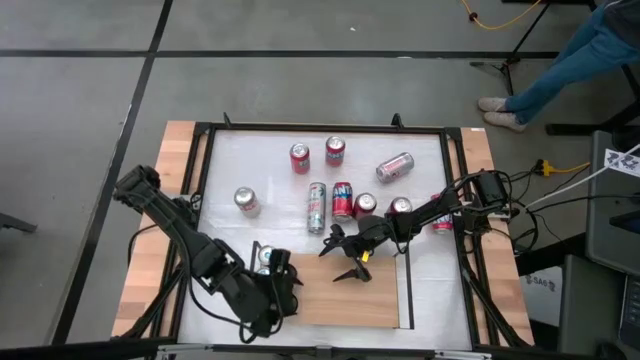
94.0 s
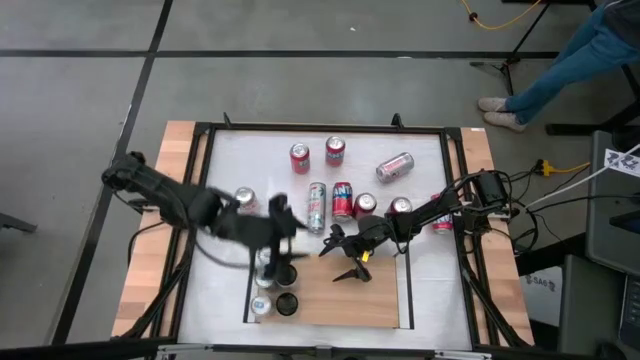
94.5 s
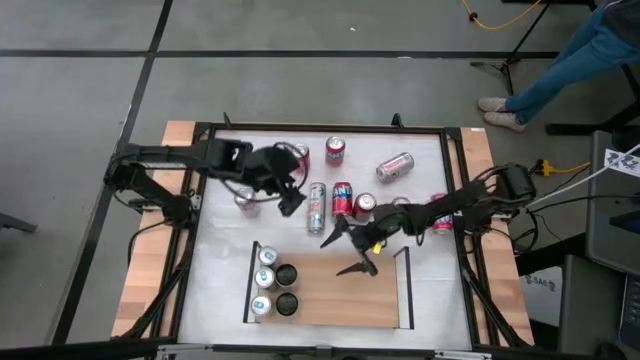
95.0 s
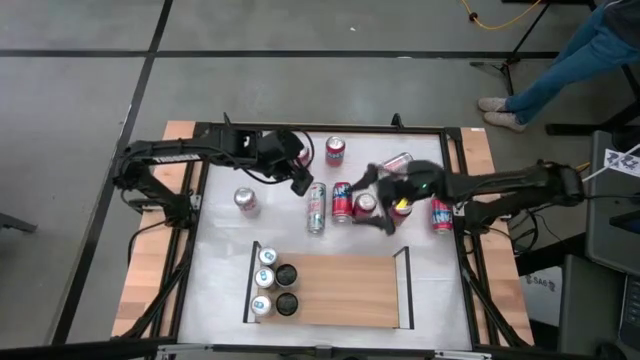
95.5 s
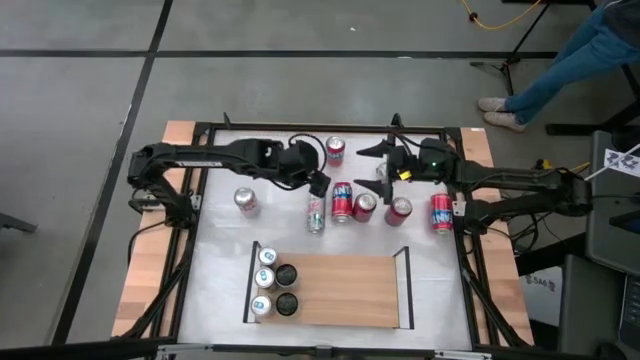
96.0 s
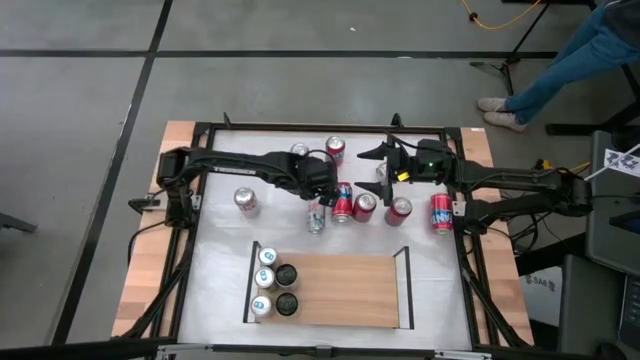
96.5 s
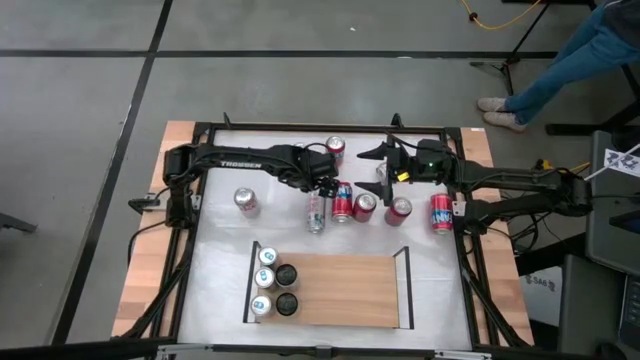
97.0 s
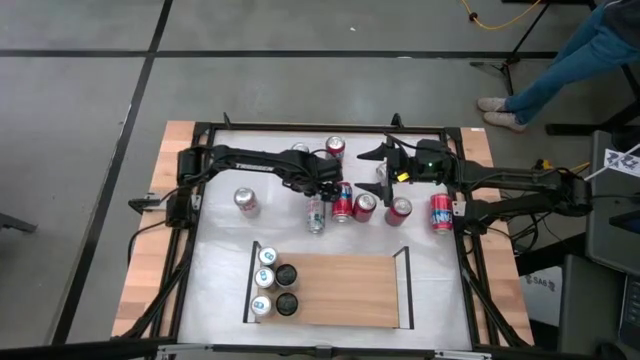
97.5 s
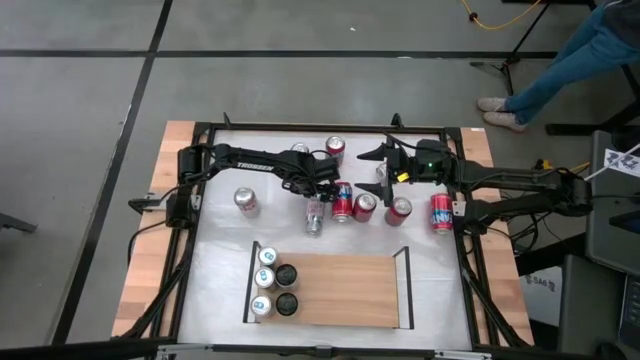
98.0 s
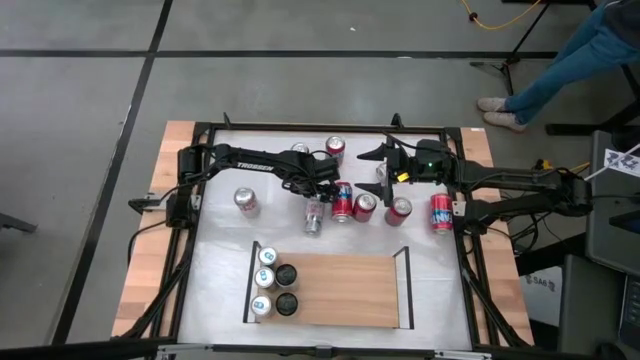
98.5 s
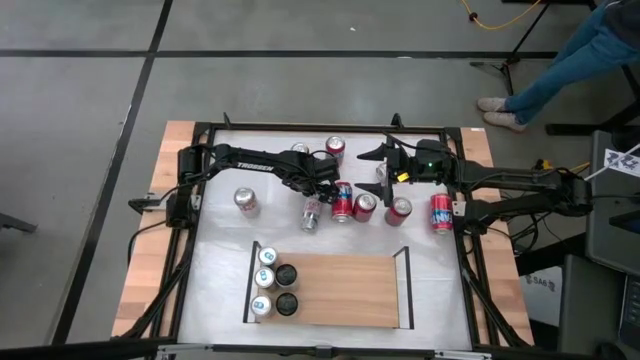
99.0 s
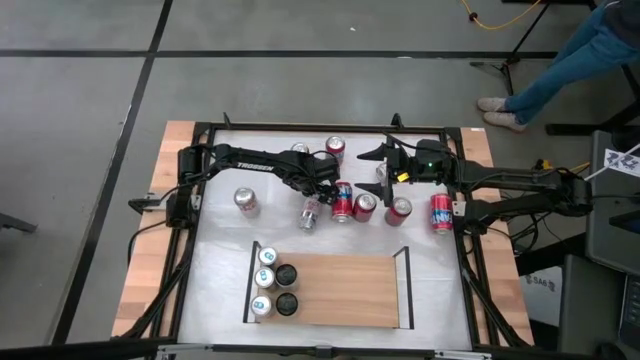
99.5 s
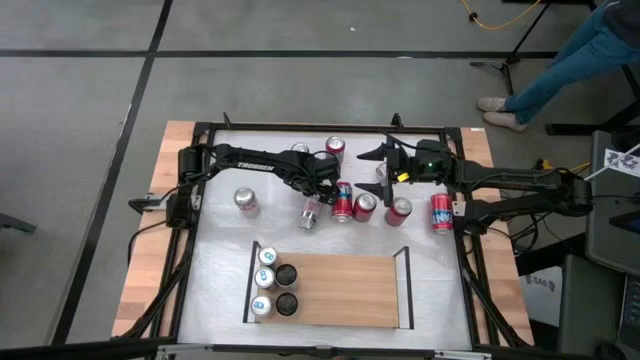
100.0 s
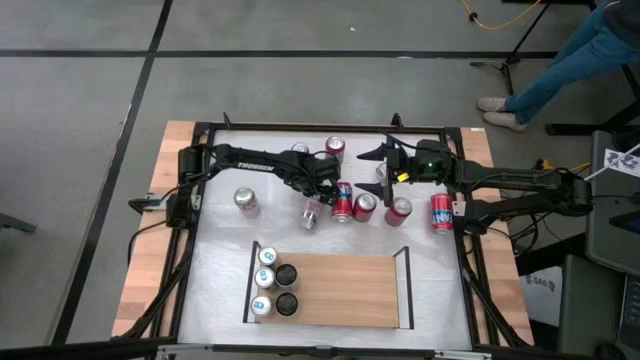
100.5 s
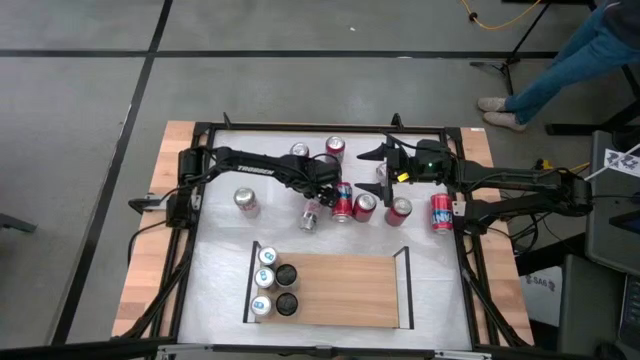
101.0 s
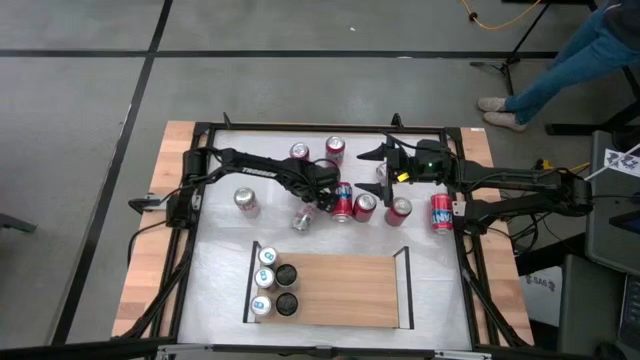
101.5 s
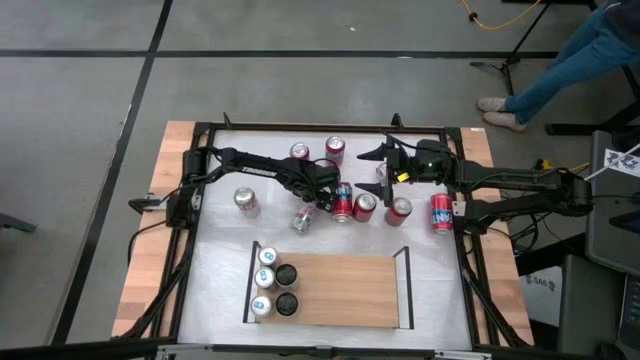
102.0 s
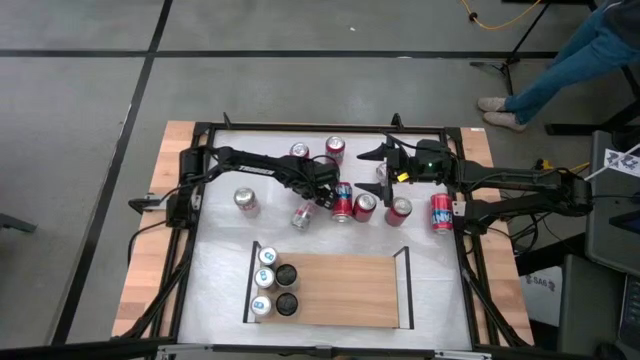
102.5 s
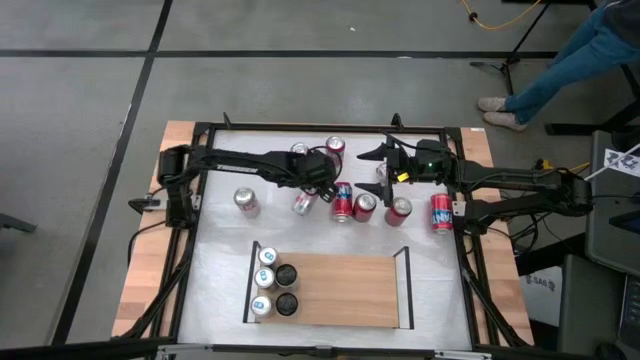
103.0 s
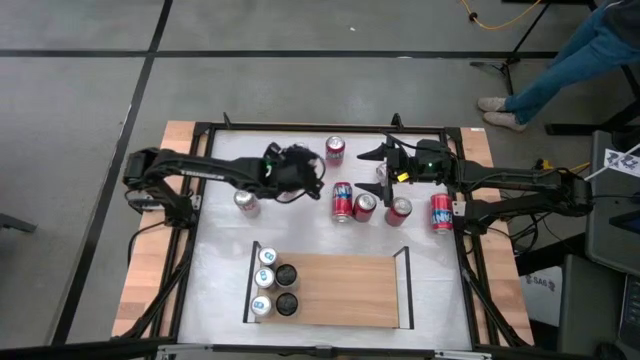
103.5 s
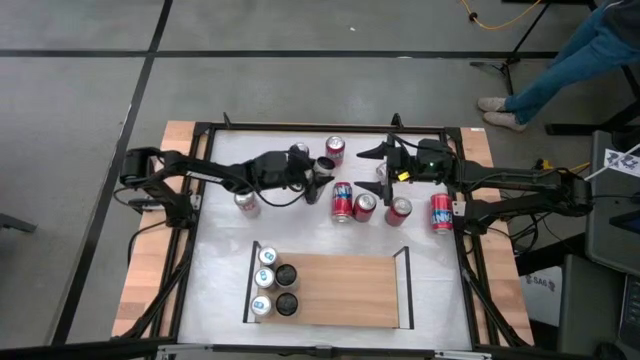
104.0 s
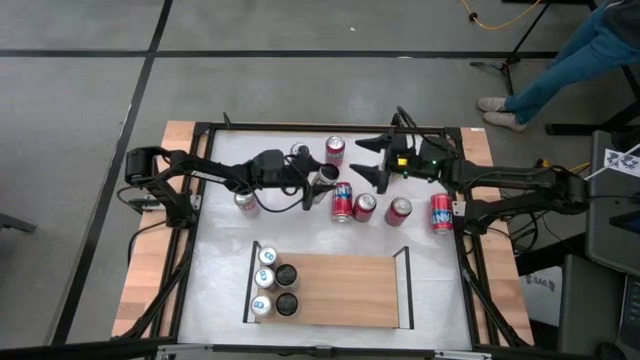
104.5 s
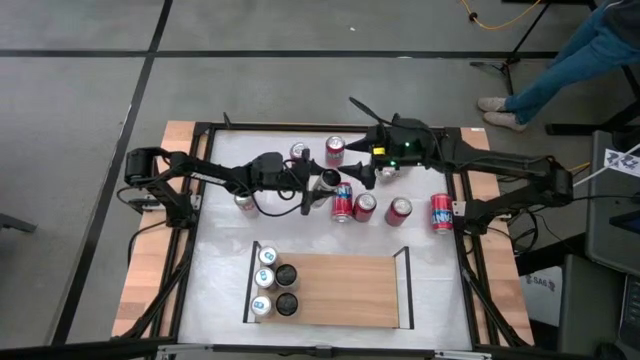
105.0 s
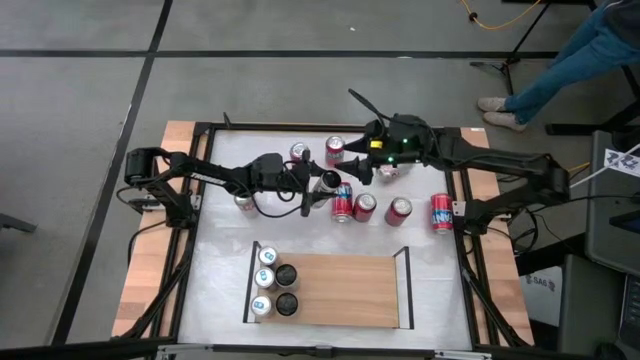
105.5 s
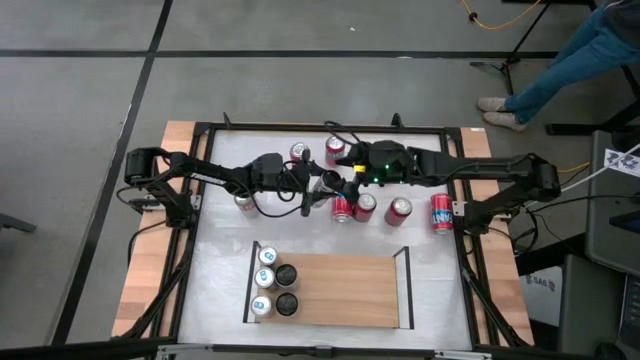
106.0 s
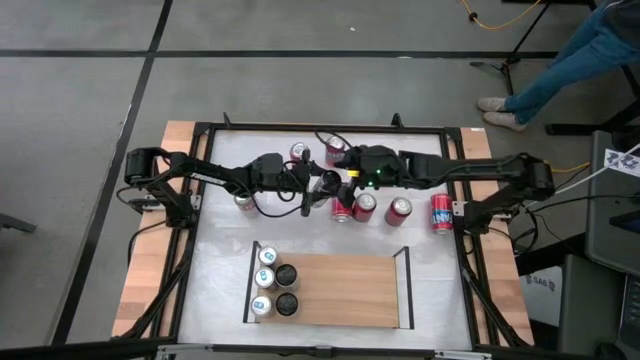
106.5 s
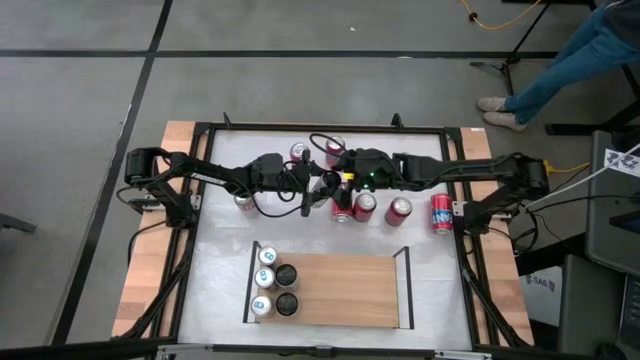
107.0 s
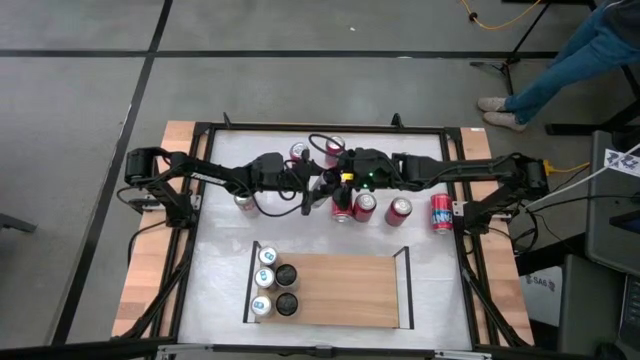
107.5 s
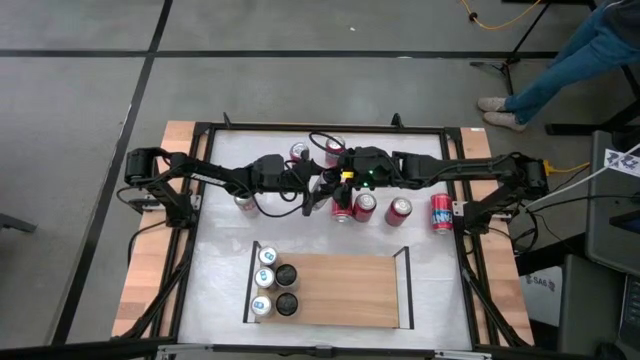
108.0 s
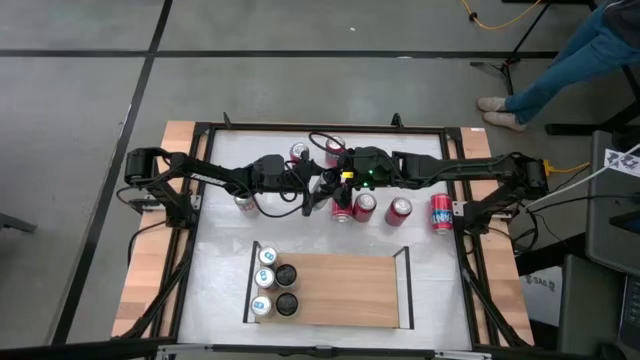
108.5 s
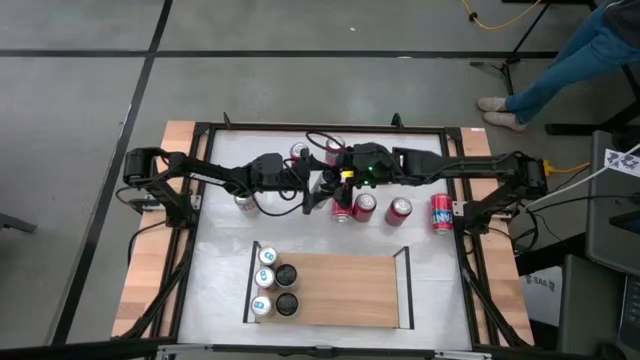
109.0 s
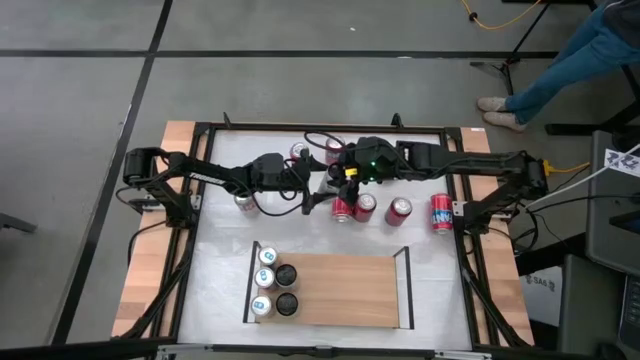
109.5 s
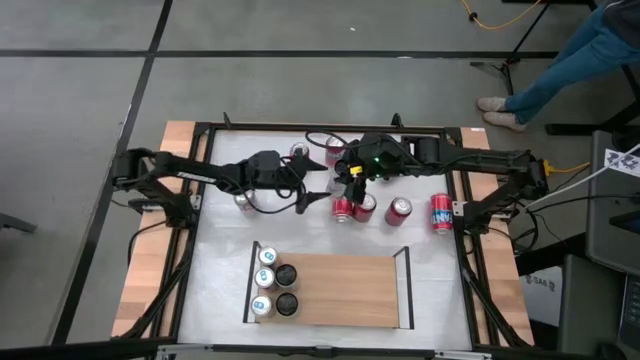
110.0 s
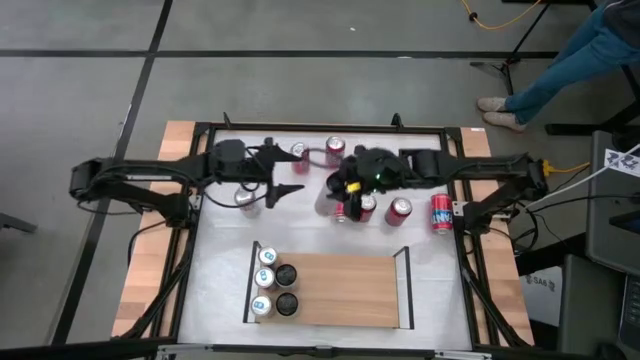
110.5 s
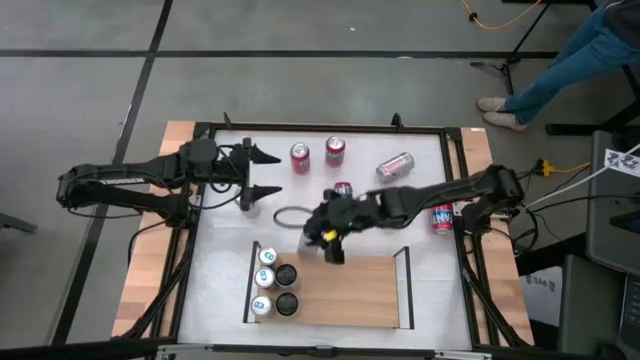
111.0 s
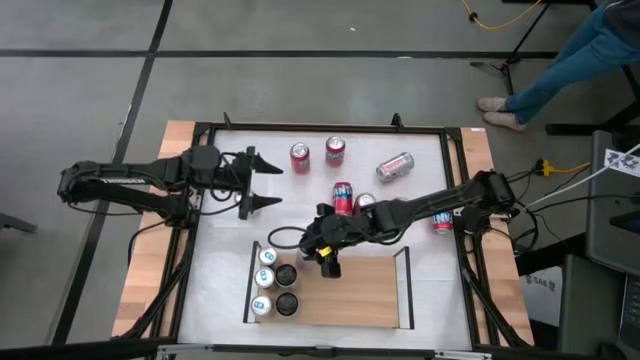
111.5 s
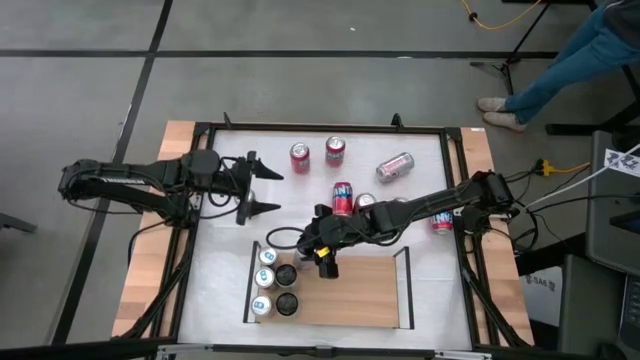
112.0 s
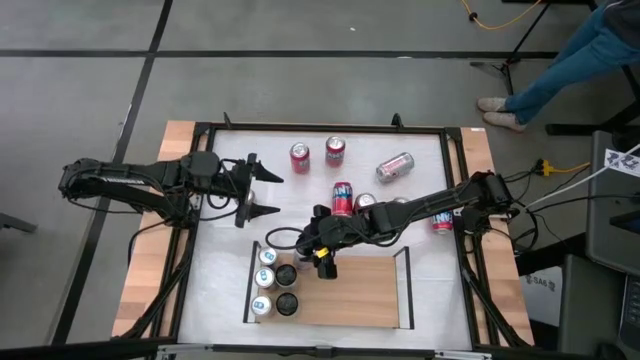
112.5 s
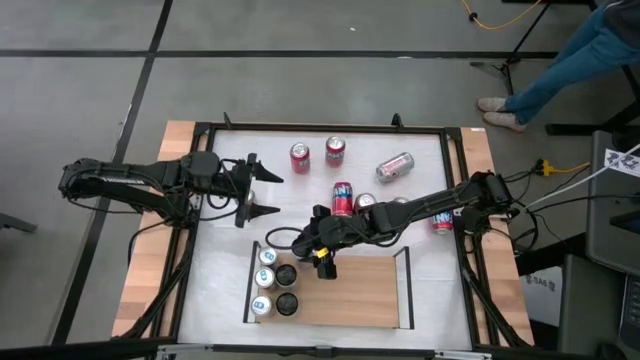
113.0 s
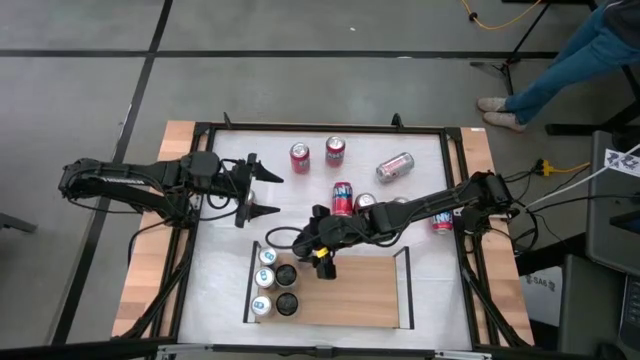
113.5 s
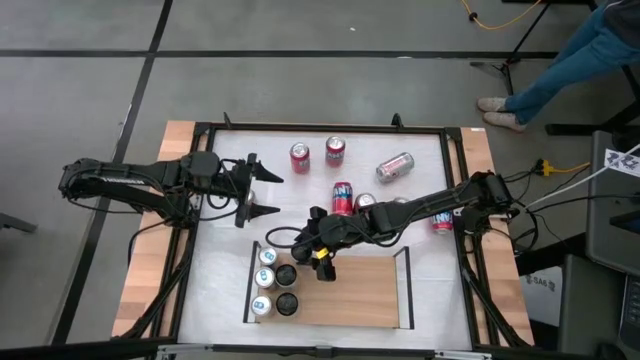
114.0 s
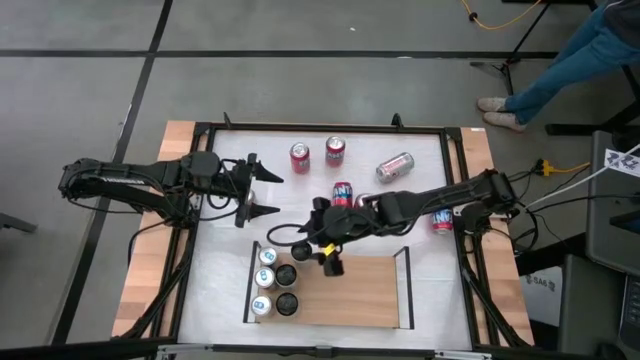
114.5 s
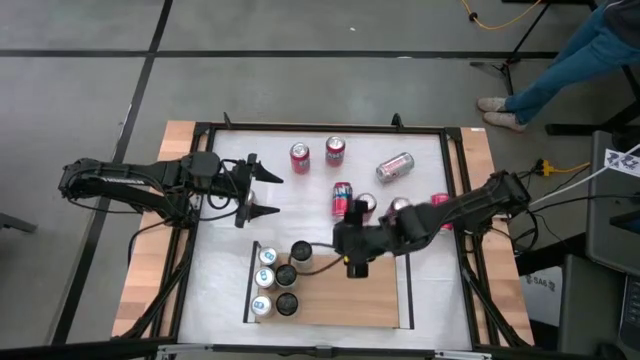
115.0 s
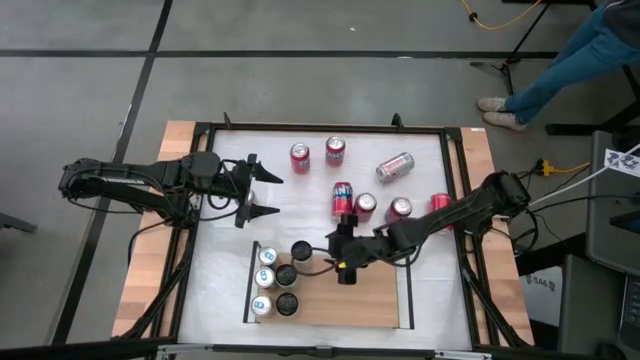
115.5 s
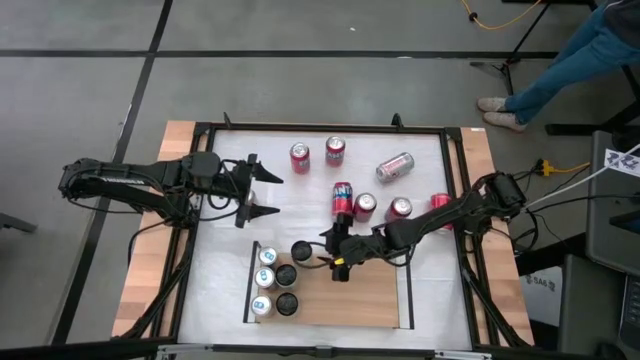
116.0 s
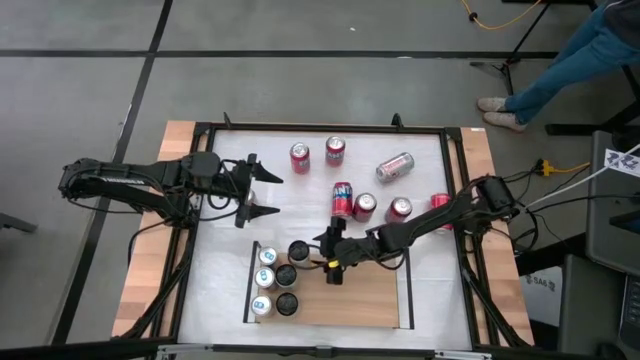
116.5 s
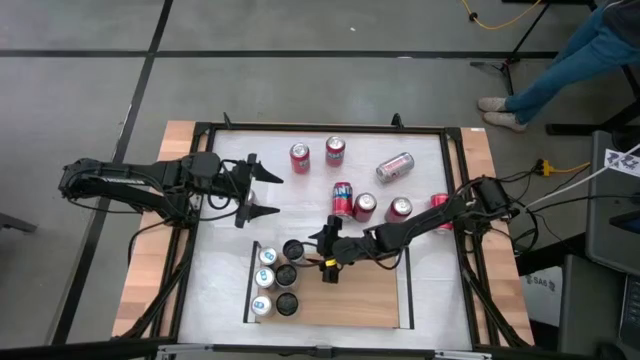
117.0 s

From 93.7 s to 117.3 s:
Task: Place canned beverage on shelf
Put the white soda can on the shelf aligned with the other white soda can
